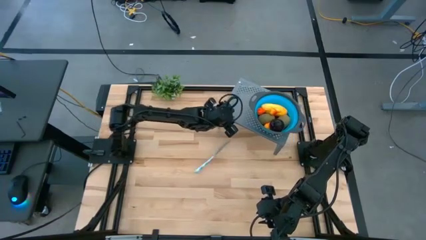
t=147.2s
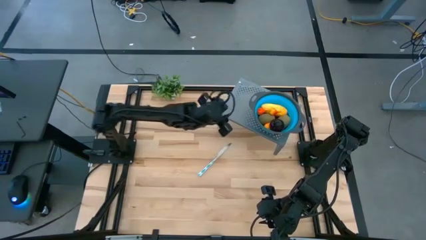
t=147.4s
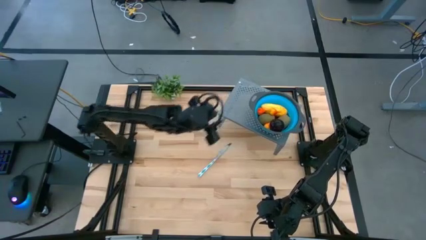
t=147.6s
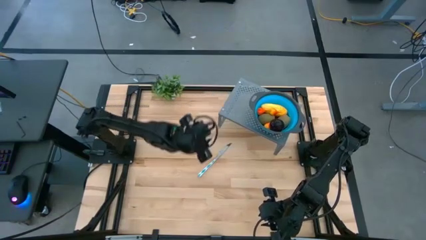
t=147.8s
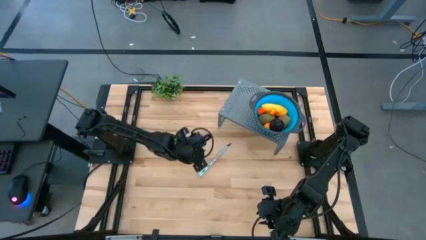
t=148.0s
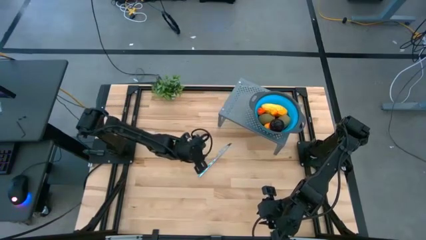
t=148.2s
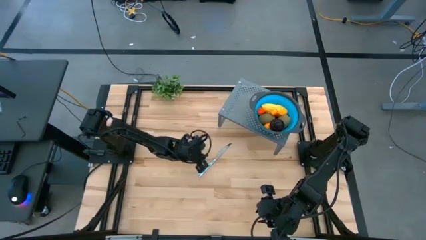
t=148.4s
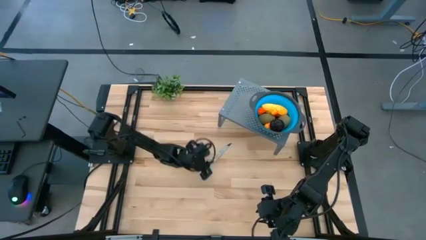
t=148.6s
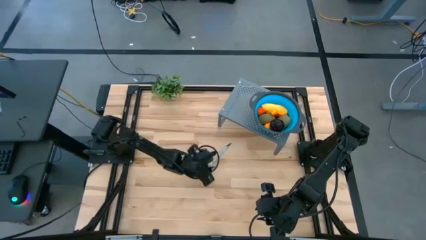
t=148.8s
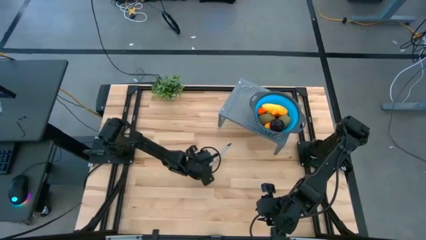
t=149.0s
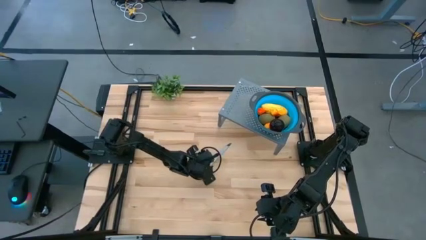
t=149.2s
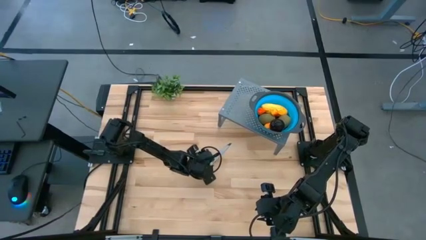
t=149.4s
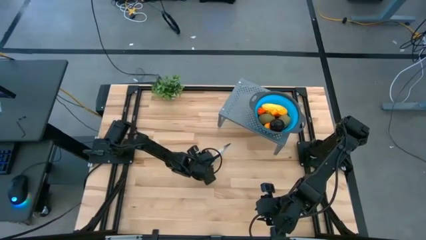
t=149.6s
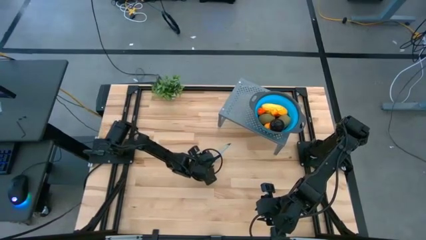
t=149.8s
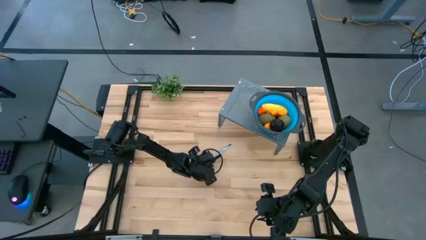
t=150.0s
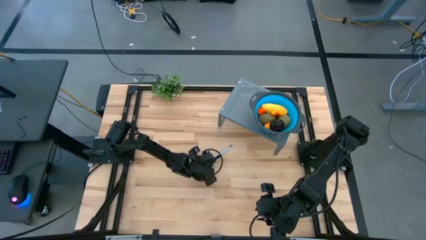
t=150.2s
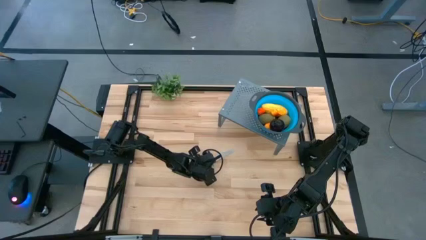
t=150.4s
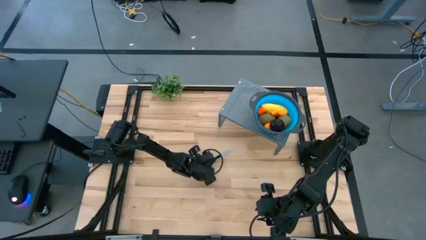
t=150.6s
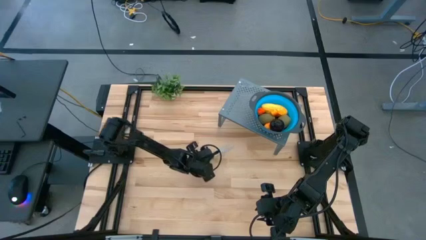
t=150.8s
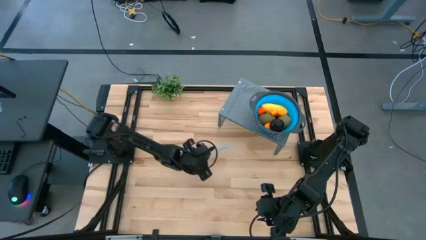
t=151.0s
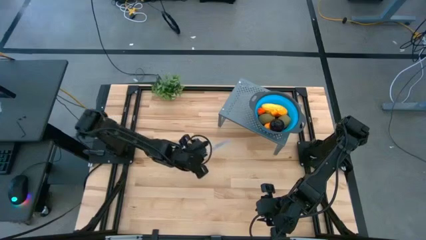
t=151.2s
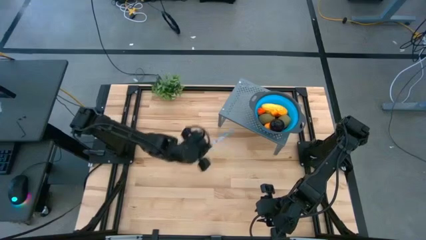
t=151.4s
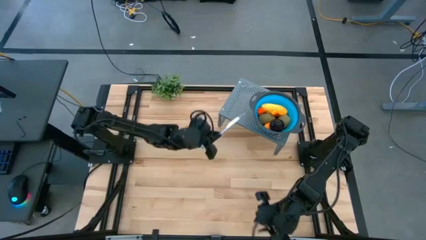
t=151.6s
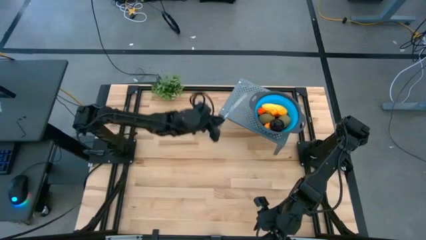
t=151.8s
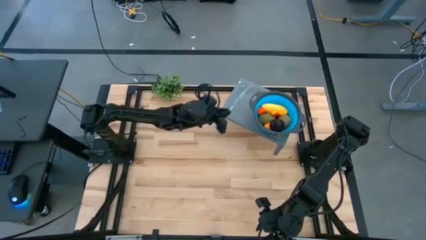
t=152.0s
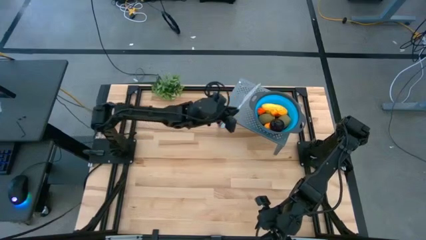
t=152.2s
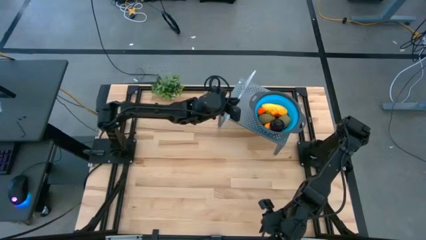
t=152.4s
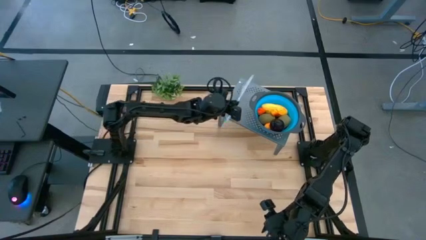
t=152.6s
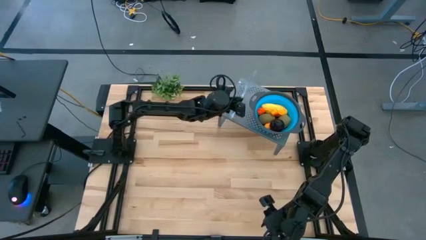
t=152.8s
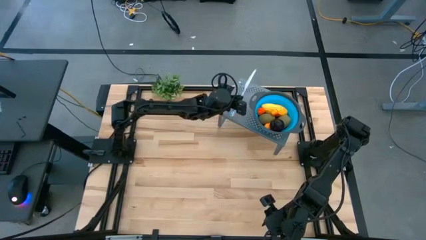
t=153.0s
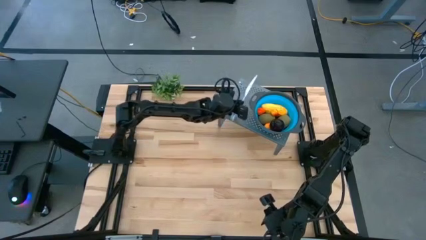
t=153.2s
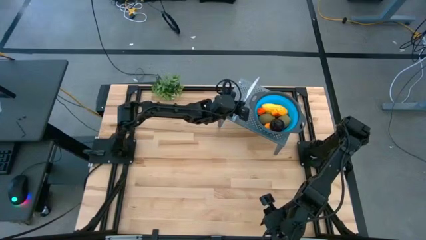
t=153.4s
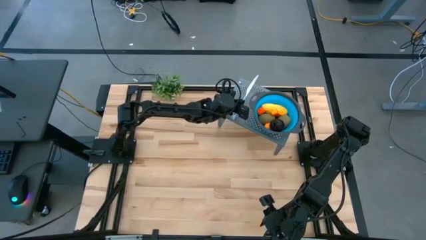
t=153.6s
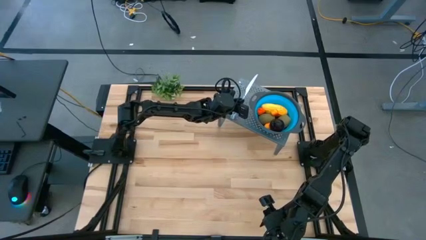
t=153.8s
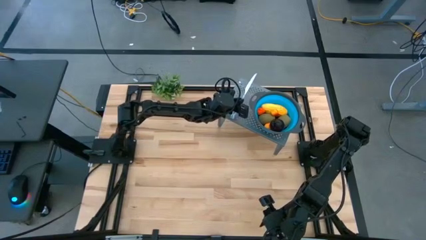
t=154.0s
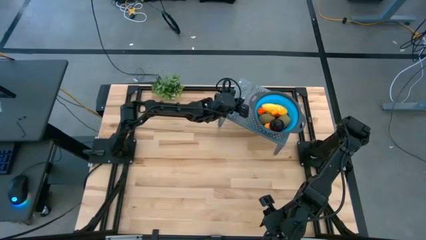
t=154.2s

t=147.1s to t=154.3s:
Task: Pick & Place Fruit
Put the knife on the shelf

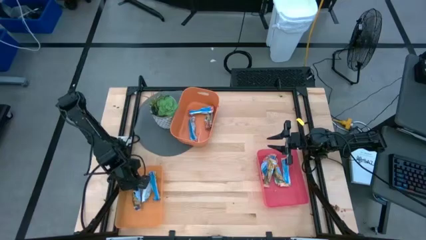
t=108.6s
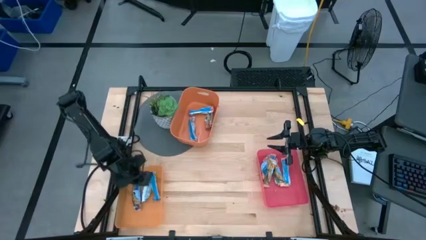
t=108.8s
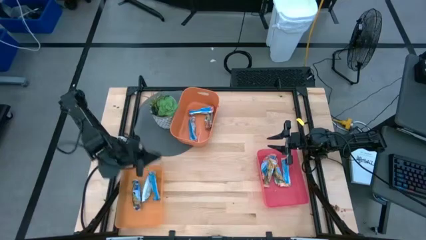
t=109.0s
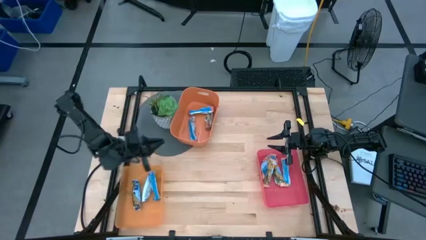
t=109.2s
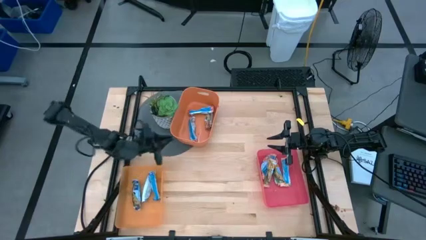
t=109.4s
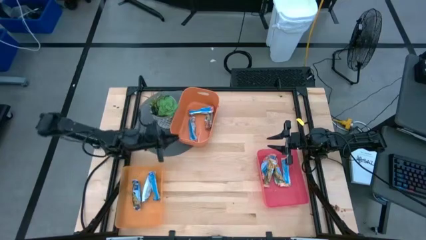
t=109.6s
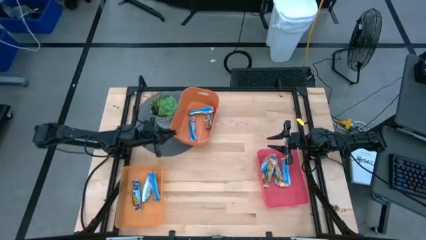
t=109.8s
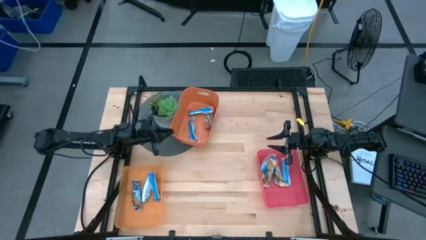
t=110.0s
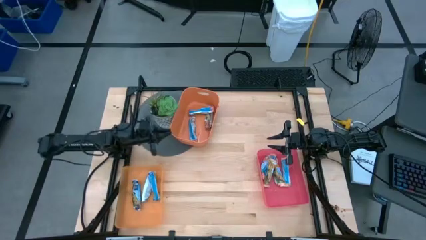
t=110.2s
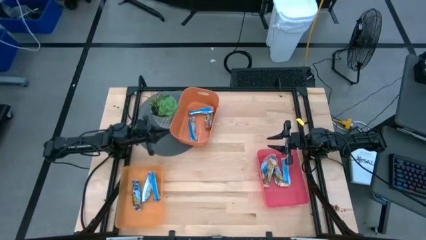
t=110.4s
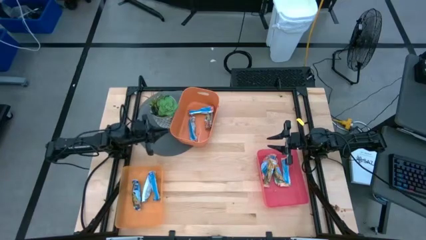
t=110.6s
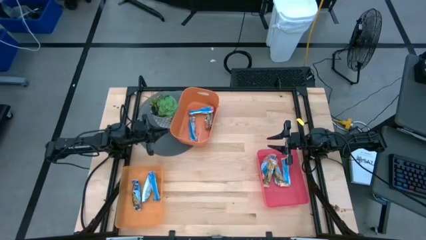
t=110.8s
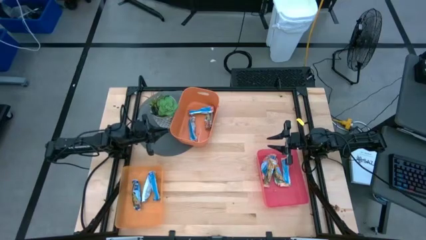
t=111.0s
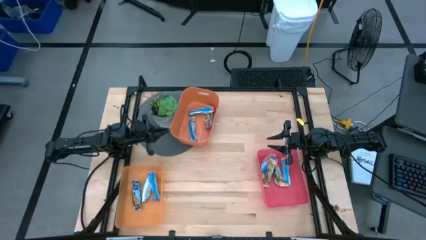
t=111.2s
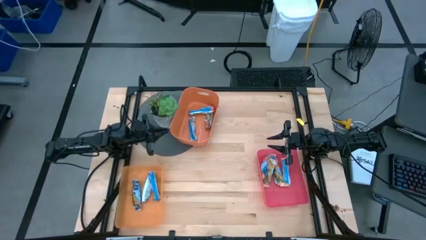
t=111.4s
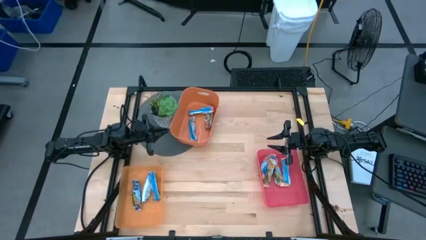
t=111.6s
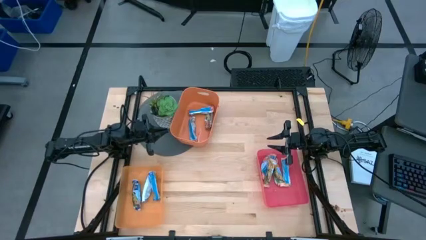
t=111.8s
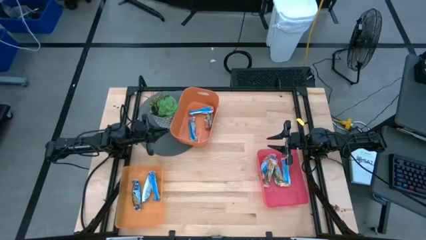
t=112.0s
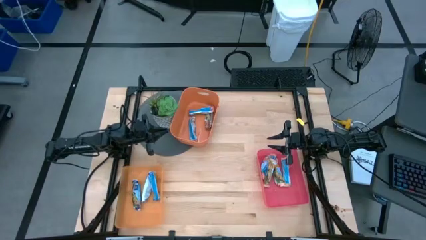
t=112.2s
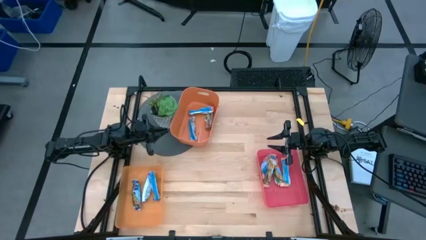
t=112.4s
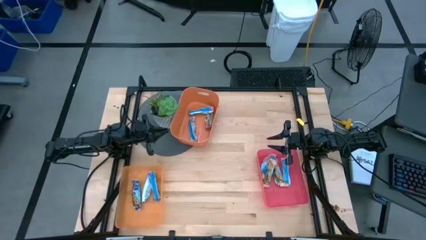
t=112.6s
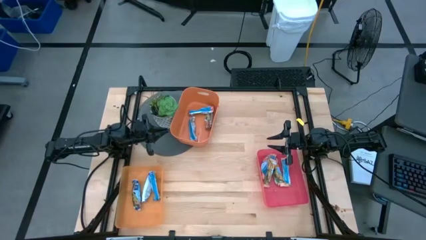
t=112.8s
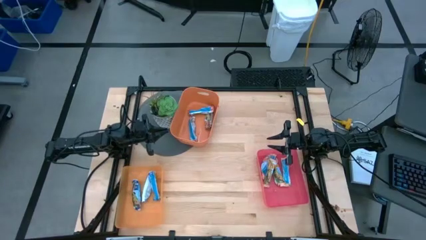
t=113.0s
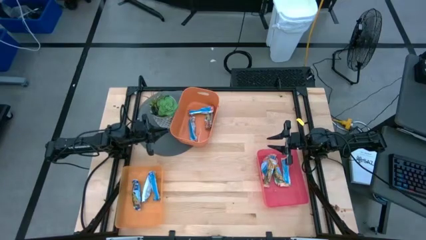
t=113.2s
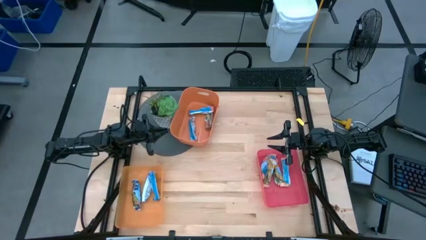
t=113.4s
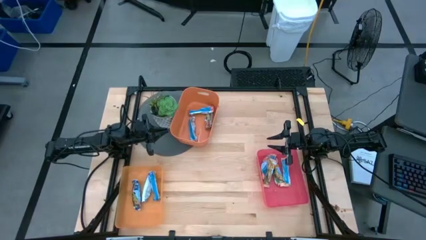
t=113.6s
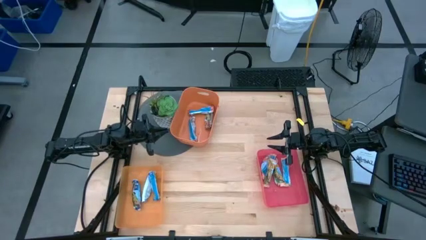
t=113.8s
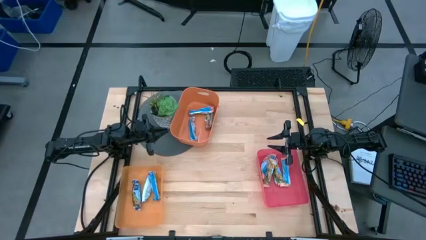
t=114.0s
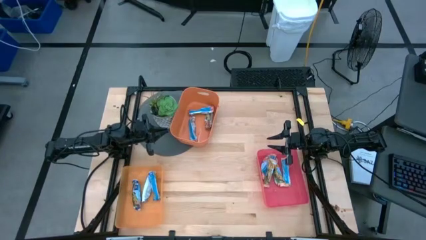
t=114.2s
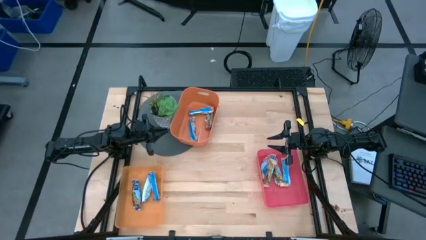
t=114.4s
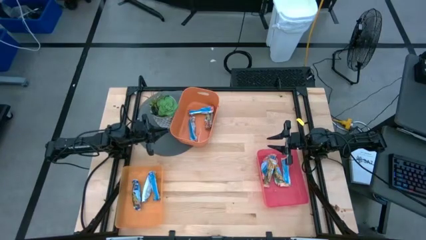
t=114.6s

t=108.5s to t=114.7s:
Task: Pick and place Granola Bars by type
Return to Home Position
